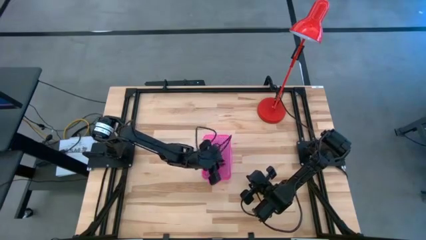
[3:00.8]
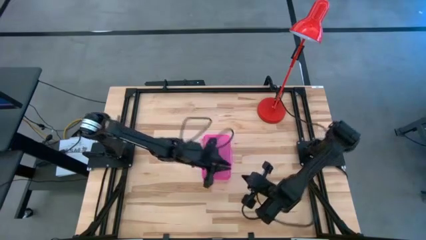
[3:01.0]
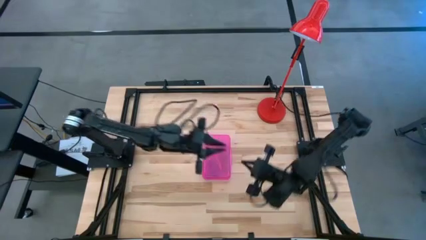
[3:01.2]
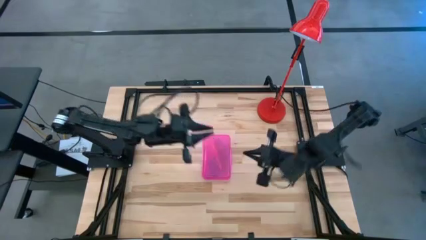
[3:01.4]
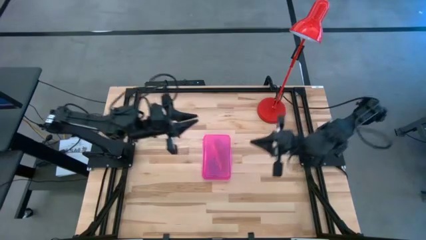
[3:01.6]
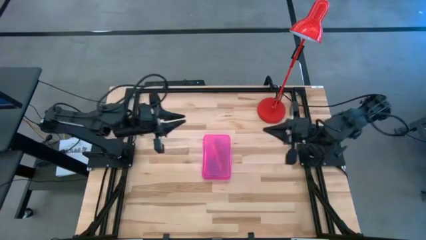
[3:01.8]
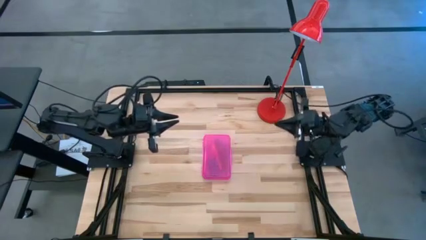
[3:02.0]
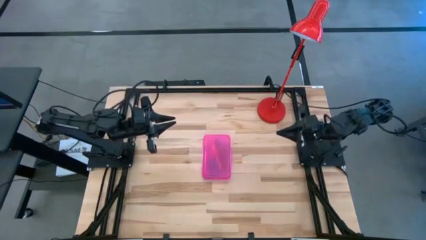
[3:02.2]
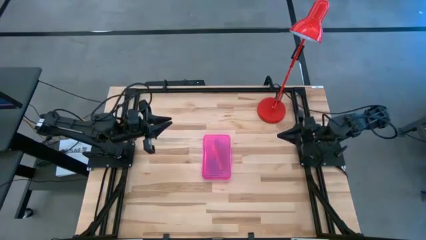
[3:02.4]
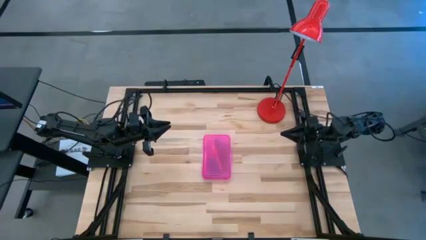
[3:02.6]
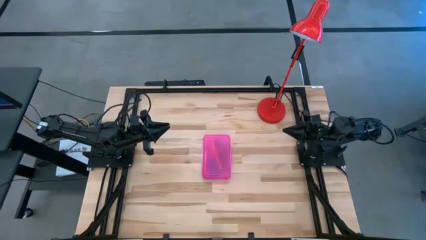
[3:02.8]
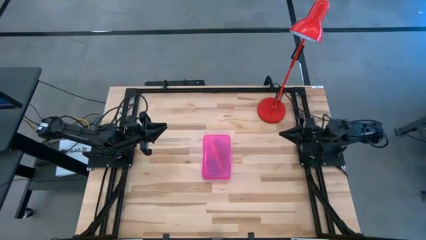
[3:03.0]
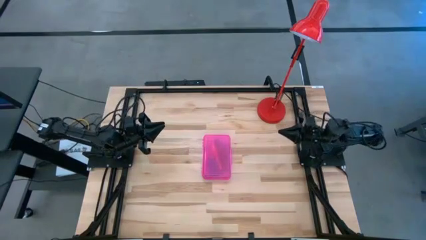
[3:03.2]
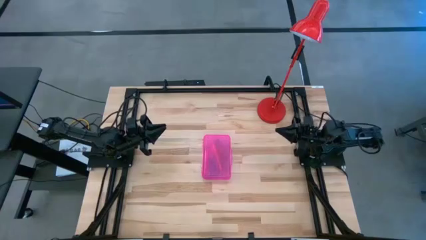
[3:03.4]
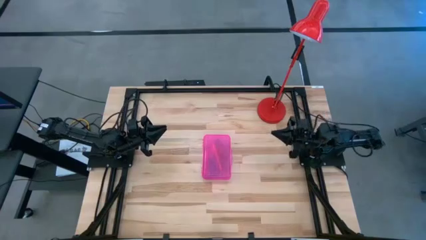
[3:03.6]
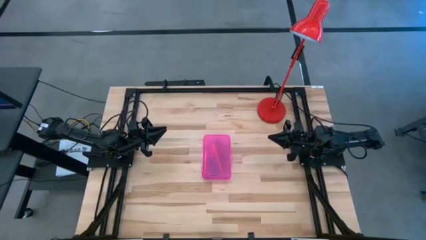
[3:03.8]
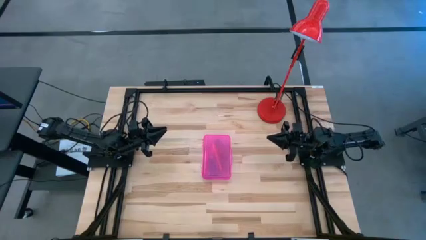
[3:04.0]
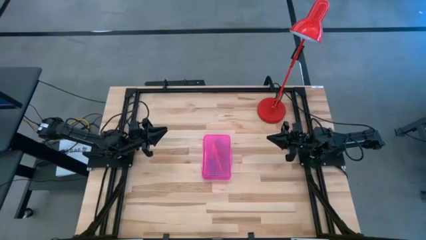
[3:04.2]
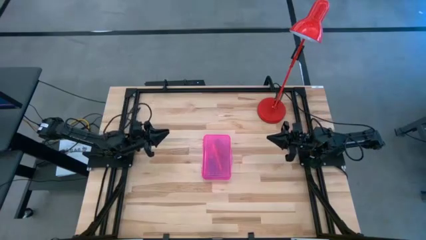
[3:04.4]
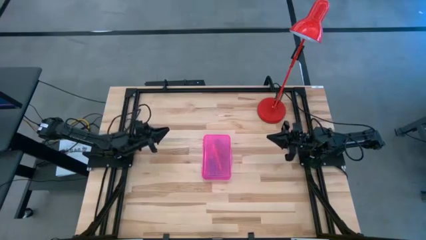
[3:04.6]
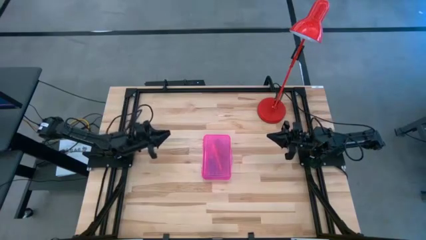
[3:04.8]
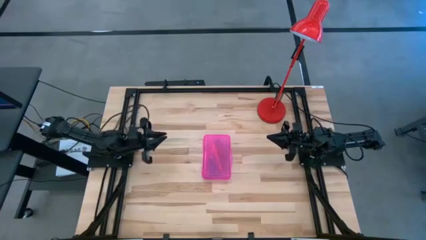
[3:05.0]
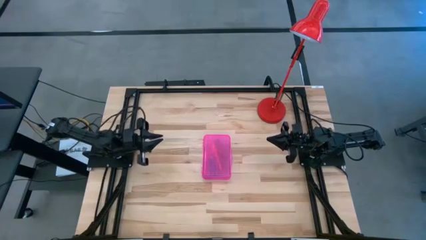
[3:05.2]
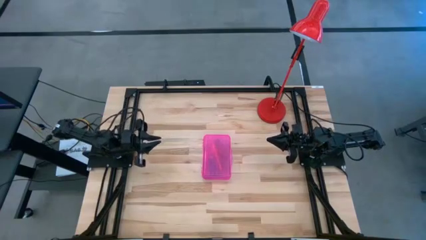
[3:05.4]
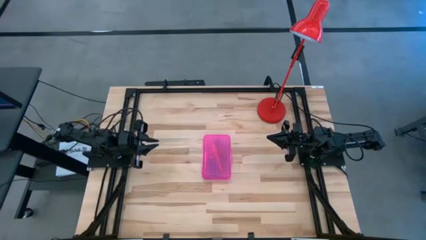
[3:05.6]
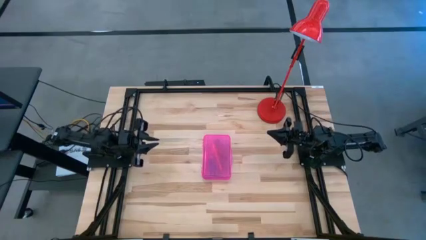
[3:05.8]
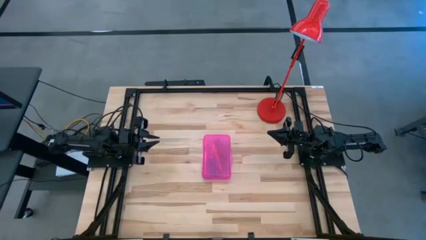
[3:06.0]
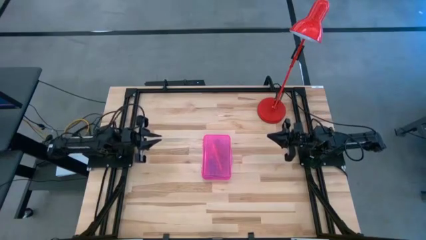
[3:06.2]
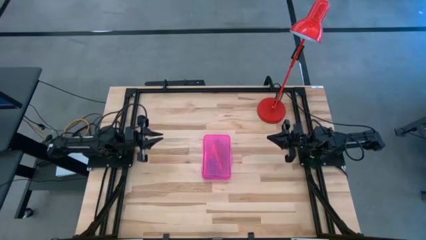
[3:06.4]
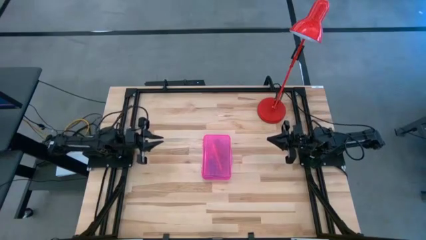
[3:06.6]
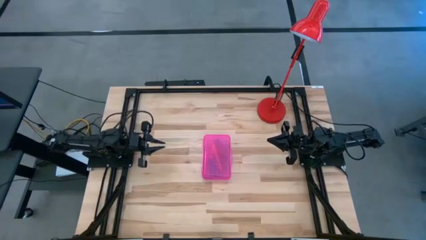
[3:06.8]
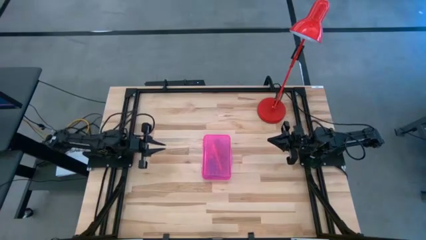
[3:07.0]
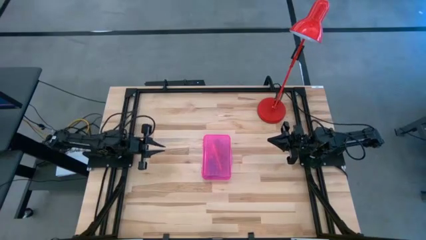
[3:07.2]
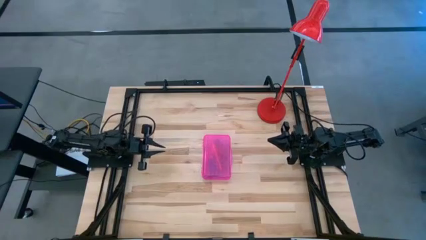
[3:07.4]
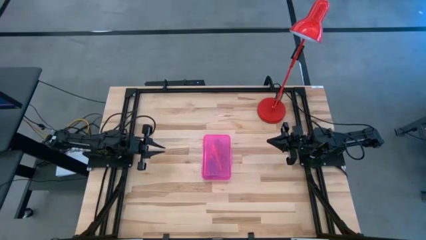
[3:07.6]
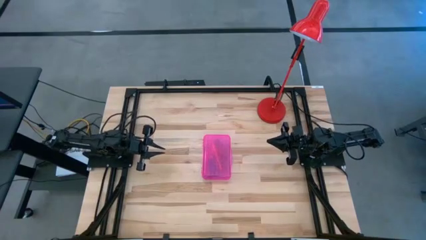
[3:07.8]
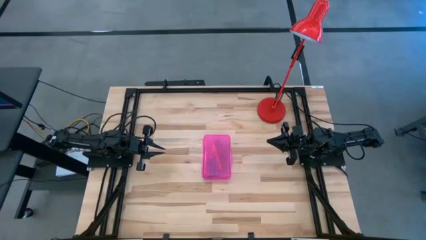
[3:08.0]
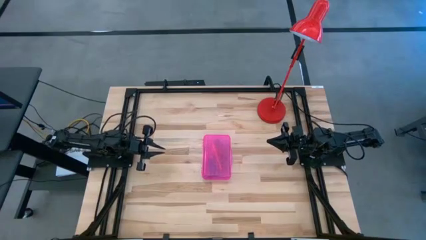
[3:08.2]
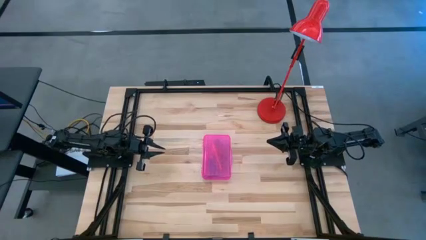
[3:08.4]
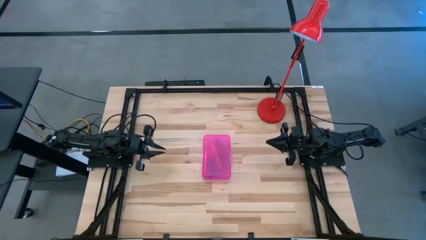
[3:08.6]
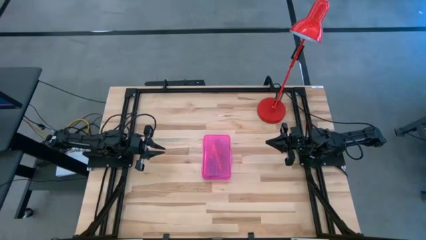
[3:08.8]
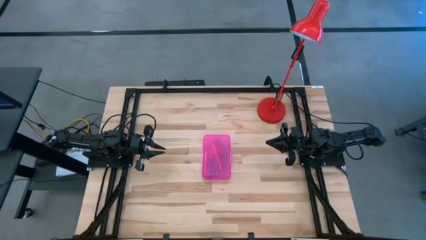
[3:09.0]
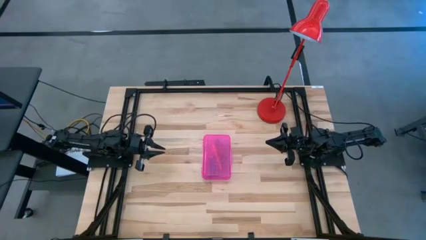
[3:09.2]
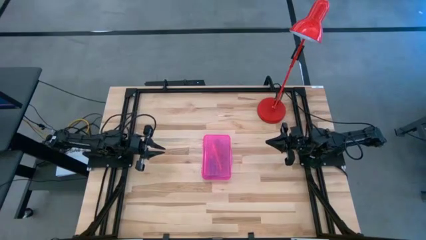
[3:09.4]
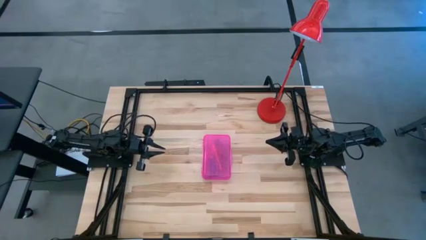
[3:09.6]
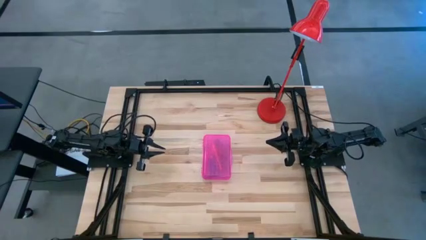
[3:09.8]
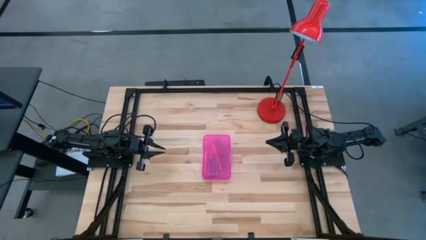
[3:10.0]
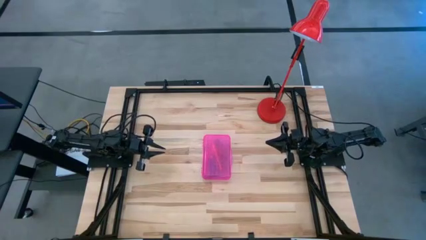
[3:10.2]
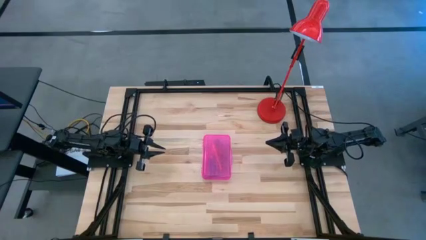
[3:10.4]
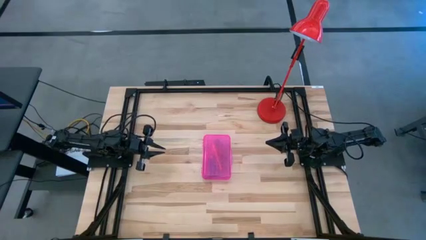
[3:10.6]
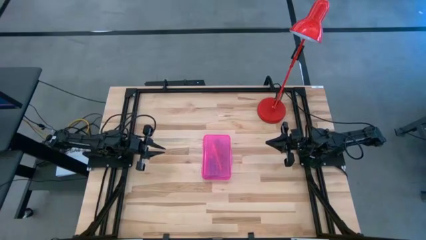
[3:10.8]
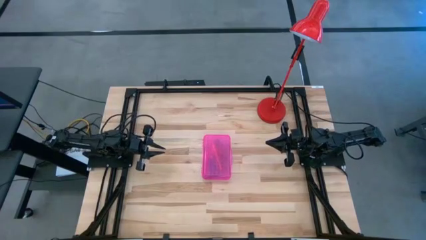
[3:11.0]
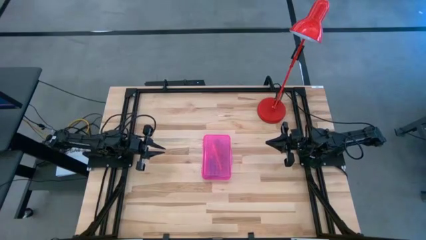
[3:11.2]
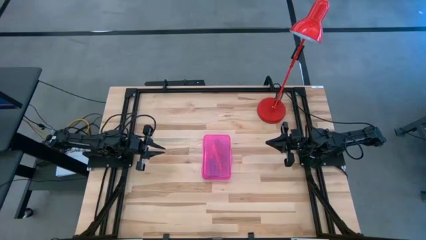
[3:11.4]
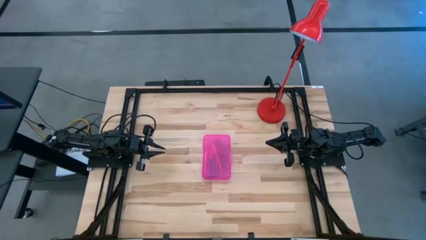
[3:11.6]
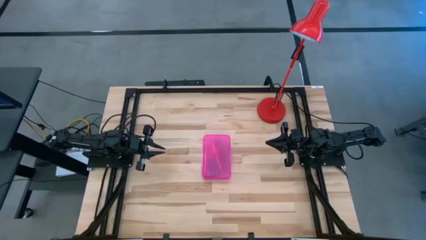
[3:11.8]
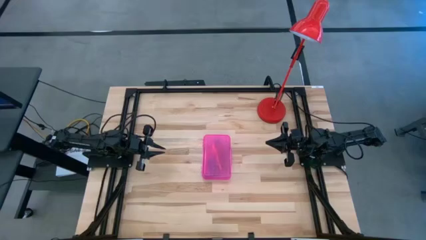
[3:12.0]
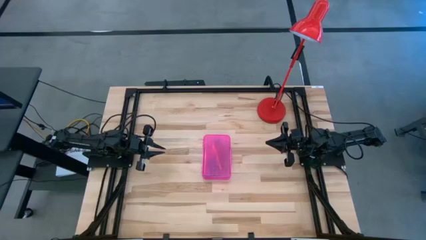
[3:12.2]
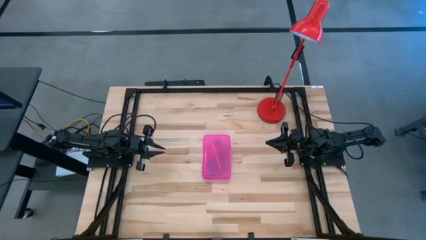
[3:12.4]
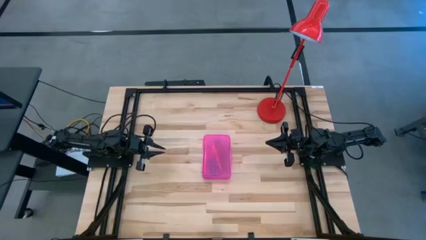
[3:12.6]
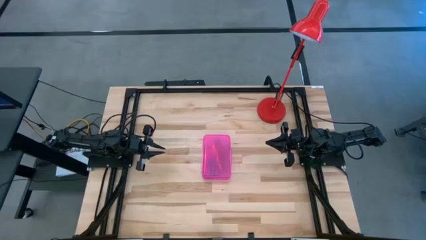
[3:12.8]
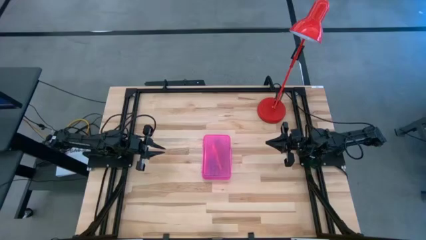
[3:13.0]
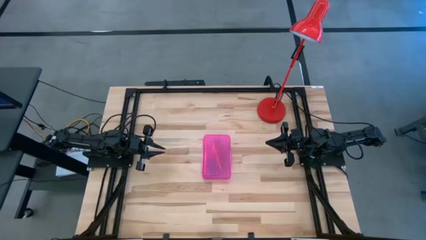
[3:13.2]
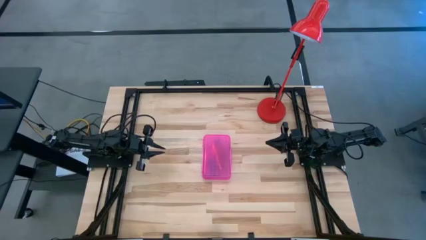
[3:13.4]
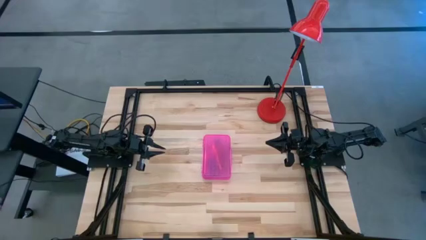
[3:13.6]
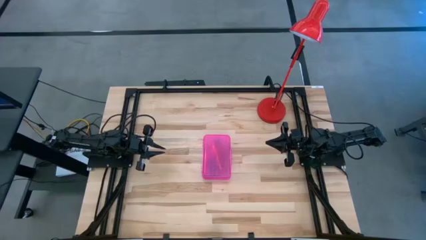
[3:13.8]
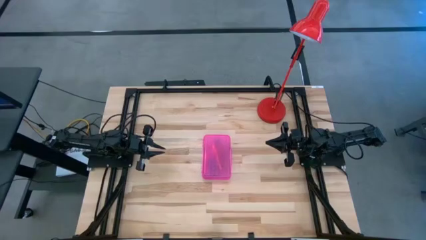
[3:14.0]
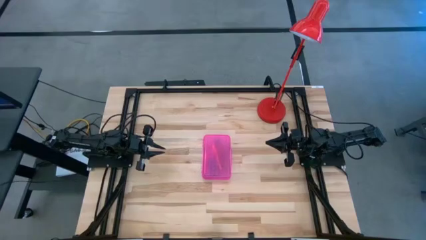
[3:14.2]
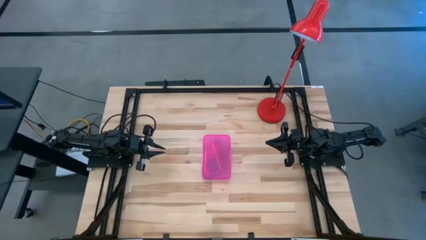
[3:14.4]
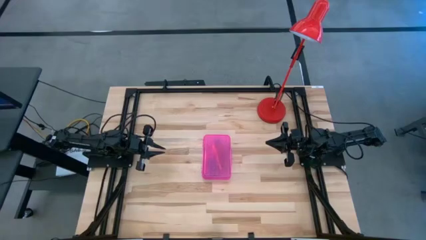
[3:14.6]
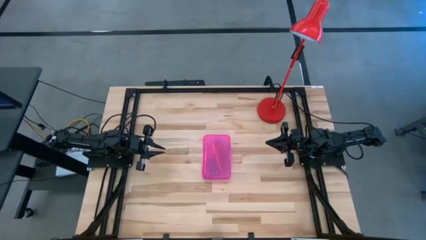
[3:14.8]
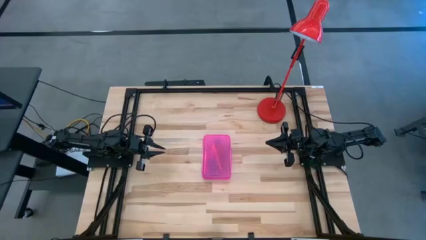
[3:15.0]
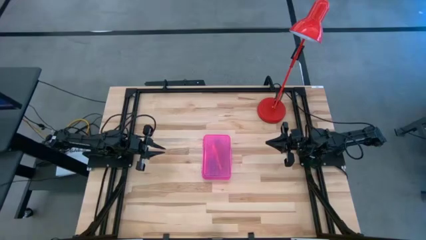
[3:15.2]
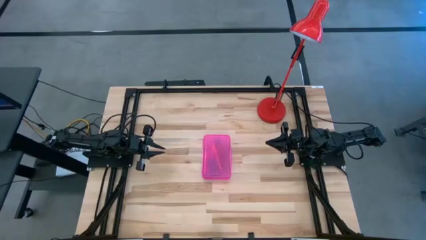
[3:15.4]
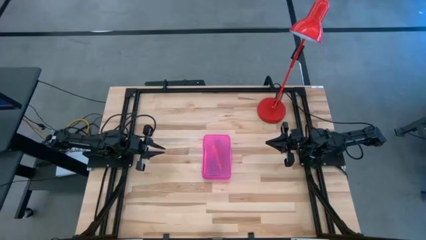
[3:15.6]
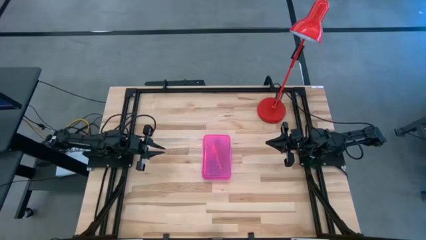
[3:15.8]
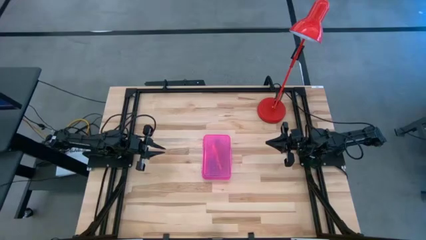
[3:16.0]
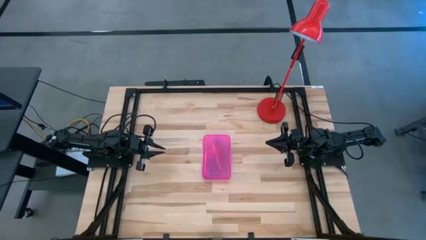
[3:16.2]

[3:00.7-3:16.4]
Task: Pick & place school supplies into a supply box
Return to Home Position
